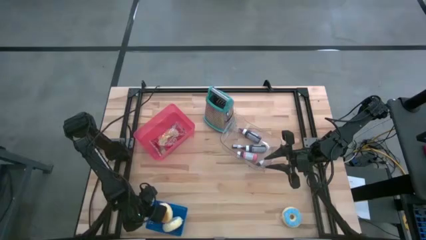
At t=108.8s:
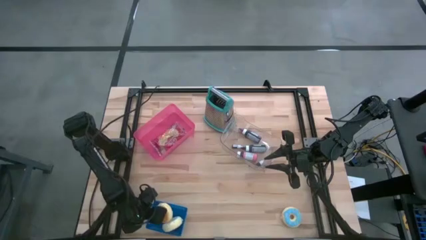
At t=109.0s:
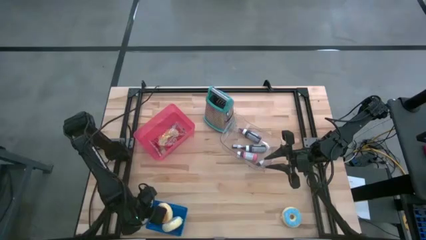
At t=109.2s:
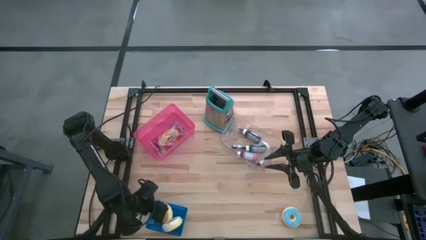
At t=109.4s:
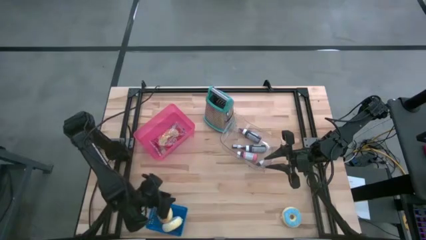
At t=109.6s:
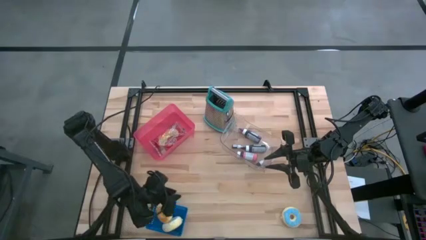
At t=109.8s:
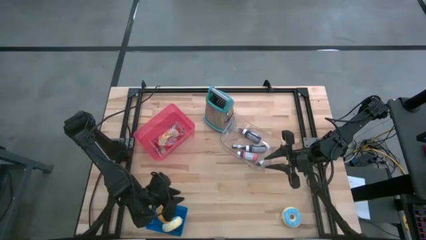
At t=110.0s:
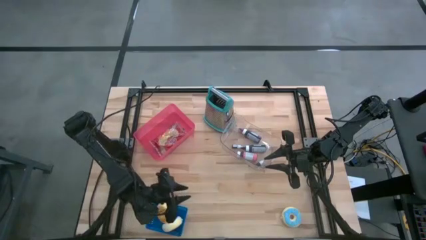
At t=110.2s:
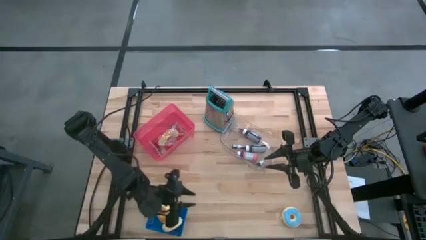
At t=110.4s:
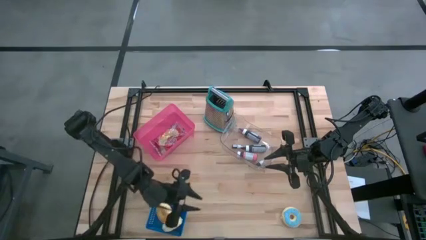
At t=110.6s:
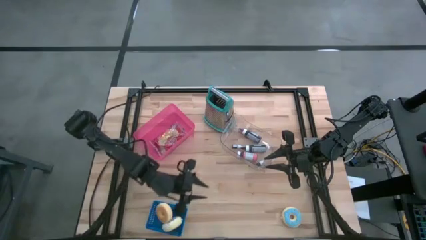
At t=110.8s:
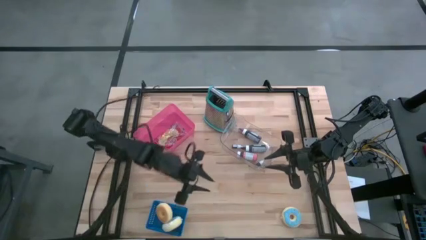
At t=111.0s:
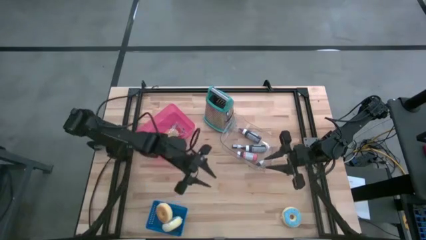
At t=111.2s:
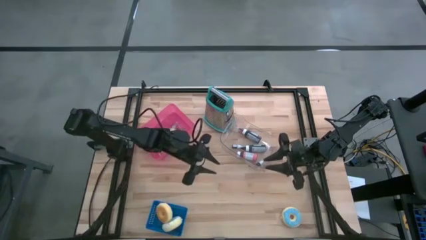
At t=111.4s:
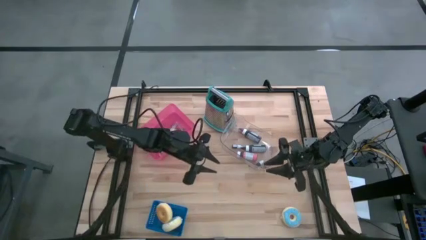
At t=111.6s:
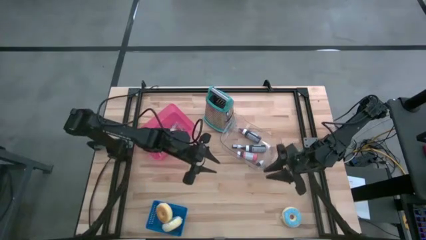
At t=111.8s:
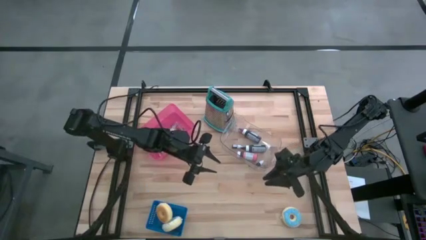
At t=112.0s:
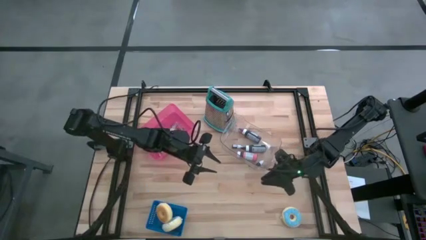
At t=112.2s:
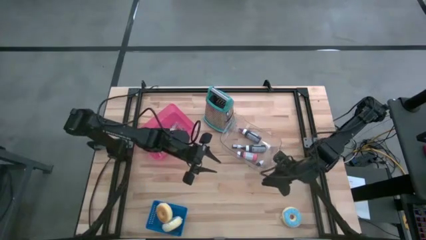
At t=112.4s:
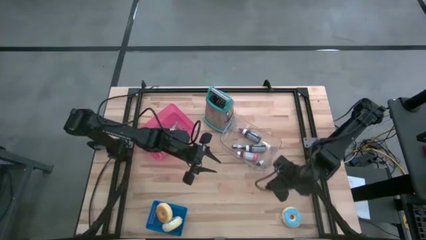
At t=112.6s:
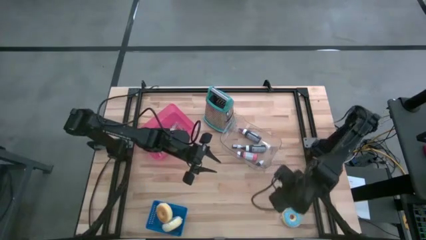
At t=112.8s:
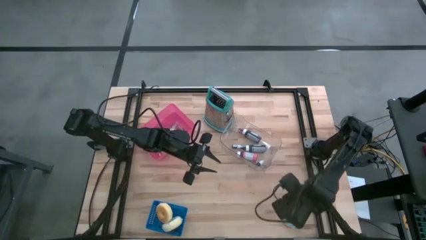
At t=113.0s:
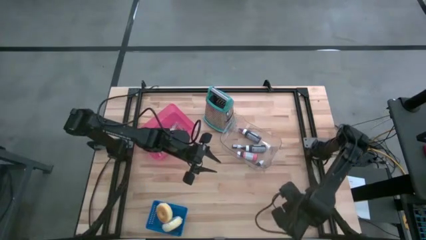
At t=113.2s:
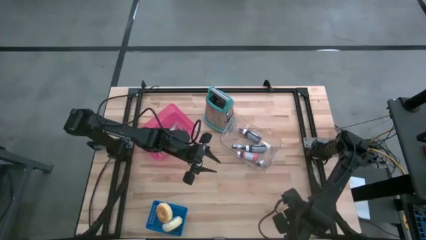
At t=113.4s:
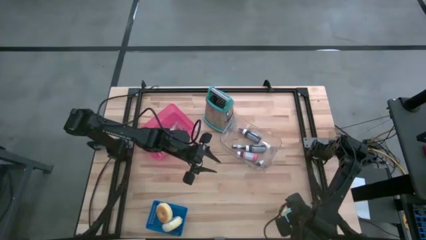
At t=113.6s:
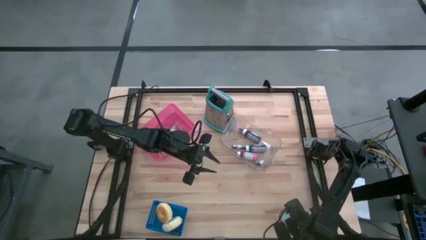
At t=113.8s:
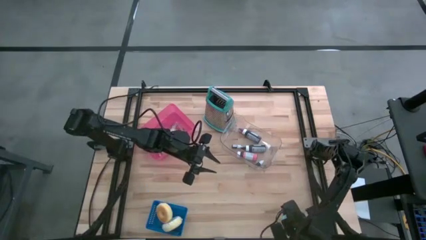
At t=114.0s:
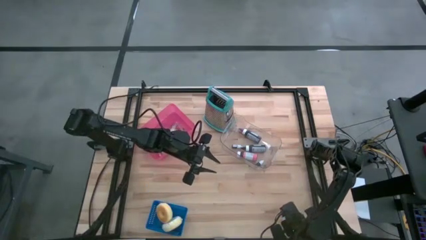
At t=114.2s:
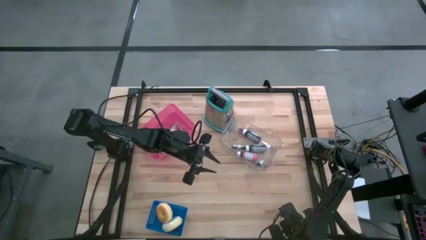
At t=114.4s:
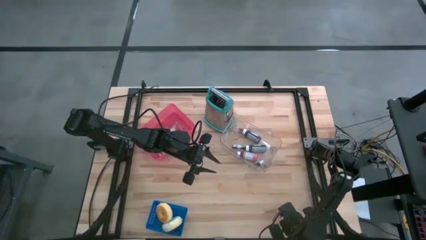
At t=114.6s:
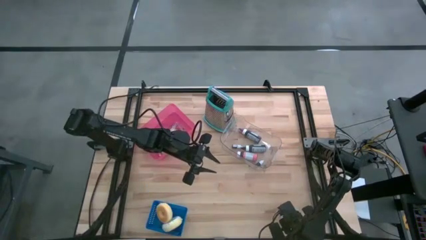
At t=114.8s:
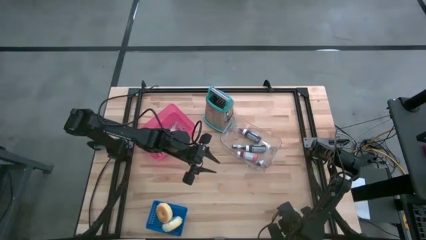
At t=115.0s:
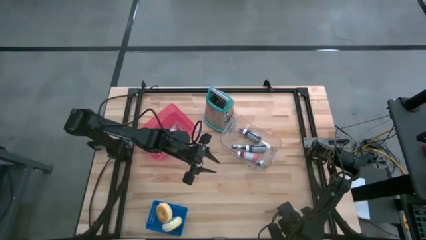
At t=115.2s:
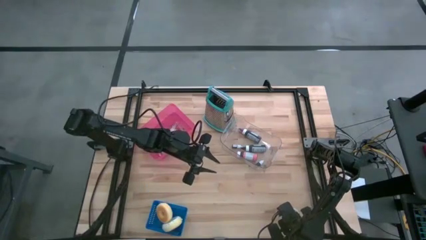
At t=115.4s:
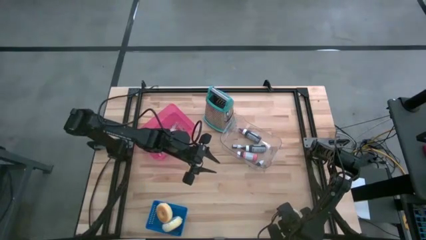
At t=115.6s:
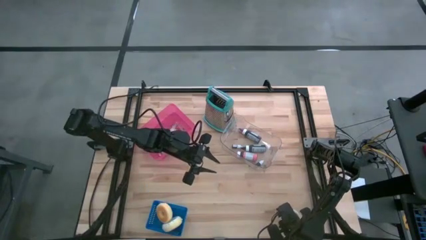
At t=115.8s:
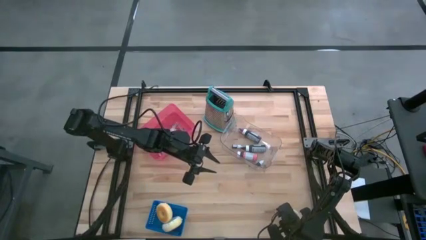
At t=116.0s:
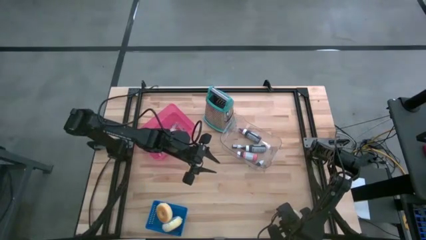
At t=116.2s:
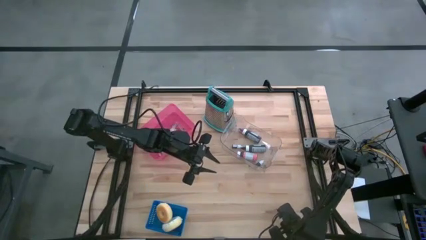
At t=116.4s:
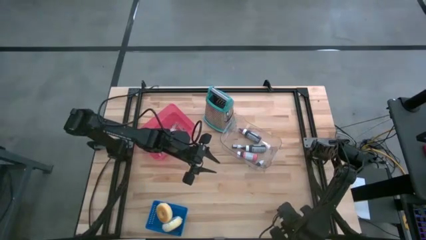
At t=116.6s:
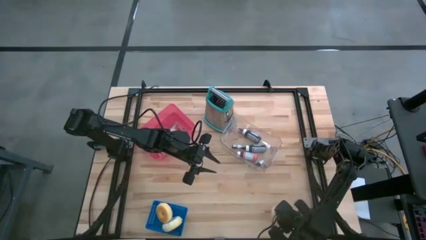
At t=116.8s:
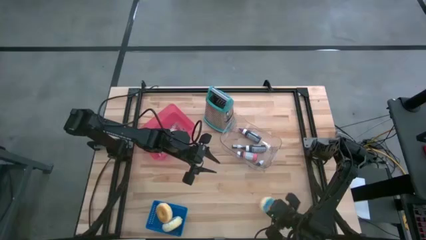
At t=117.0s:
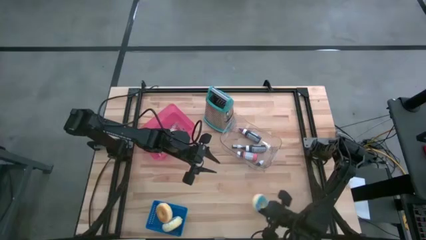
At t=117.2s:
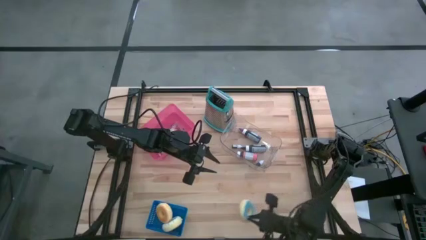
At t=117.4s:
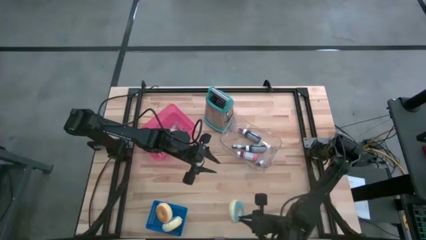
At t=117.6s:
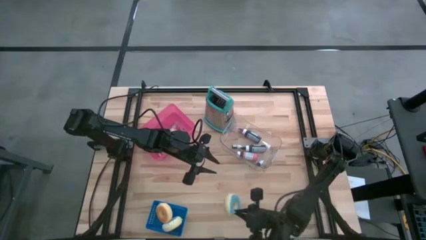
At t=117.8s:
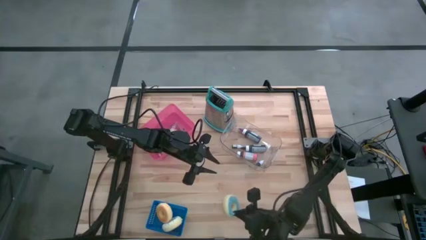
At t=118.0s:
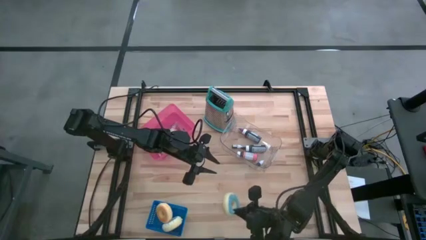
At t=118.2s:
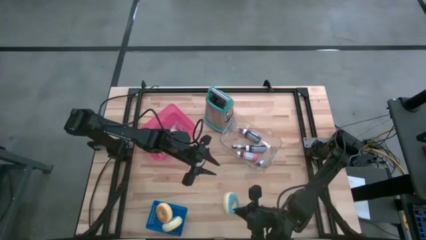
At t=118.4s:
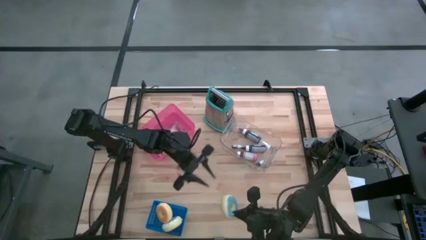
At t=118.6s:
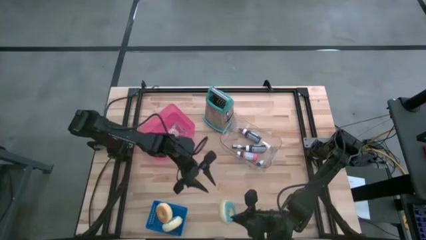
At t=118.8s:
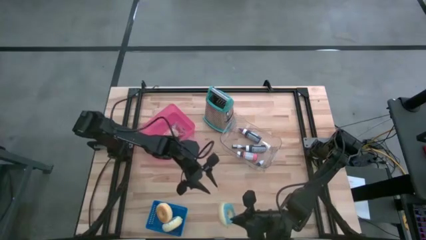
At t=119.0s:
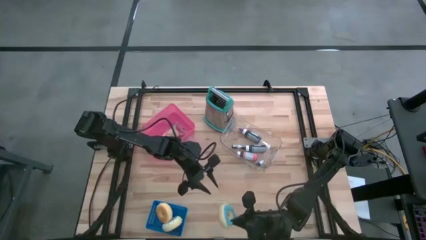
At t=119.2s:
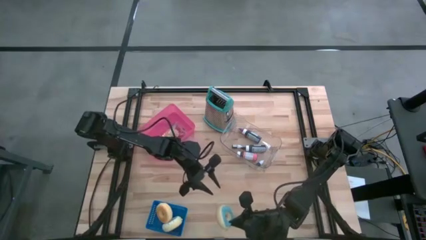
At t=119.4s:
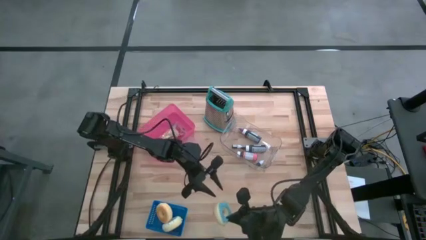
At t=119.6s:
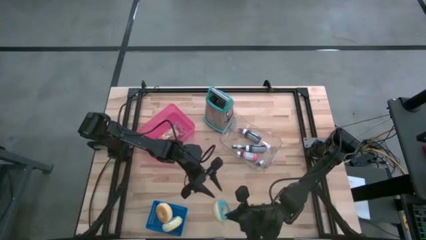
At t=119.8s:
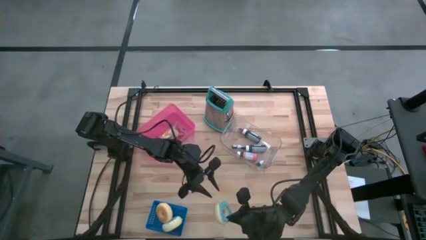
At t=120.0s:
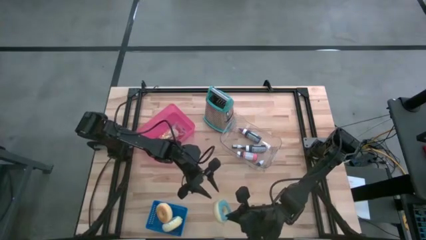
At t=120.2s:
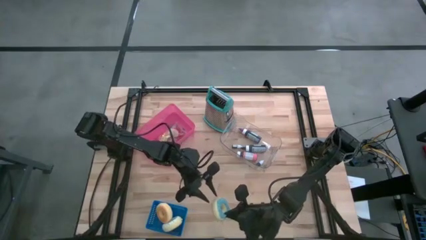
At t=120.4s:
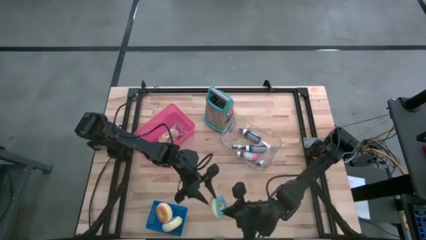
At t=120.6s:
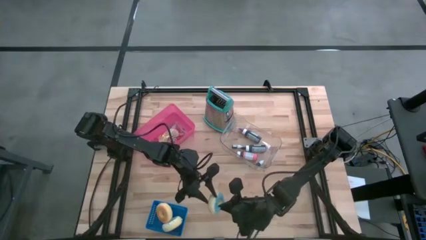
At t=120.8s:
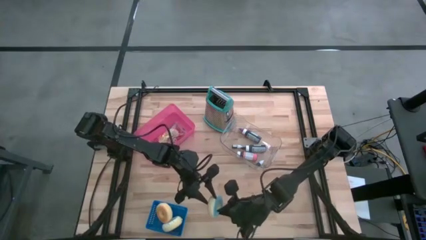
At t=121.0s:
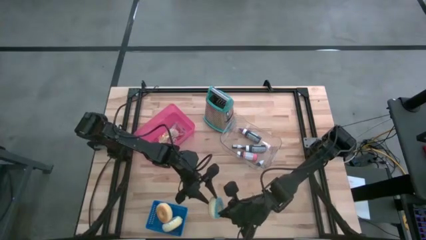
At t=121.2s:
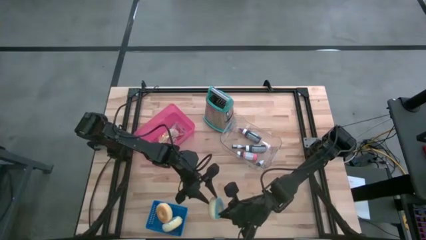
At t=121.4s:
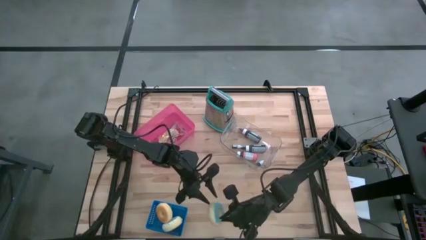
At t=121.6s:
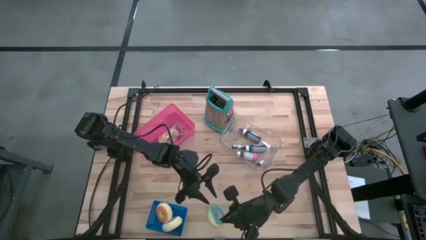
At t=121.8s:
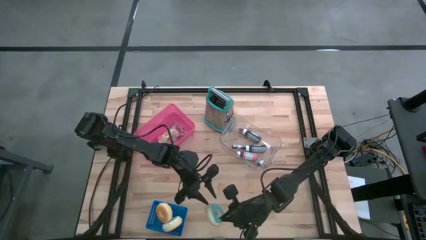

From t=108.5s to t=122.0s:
Task: Pick & Place Food Item
Put the blue donut into the blue bin

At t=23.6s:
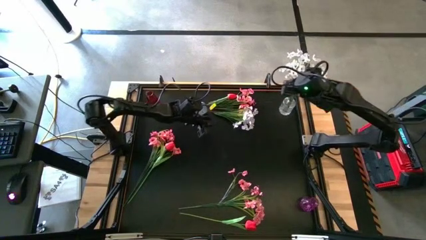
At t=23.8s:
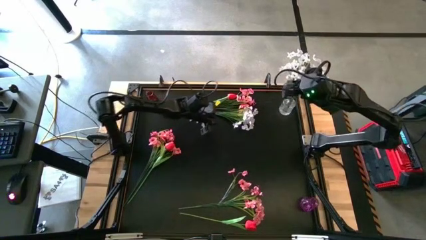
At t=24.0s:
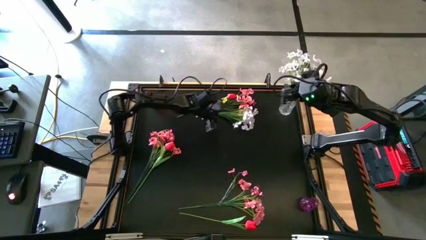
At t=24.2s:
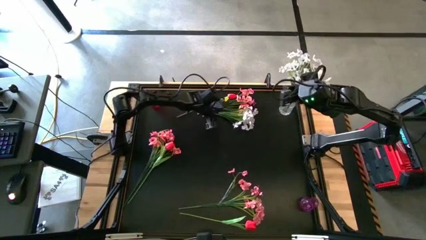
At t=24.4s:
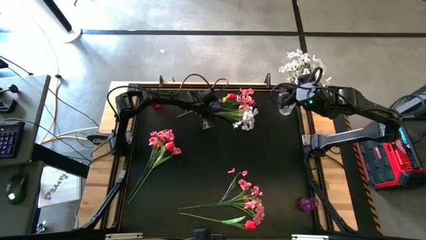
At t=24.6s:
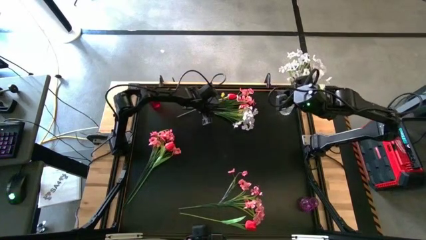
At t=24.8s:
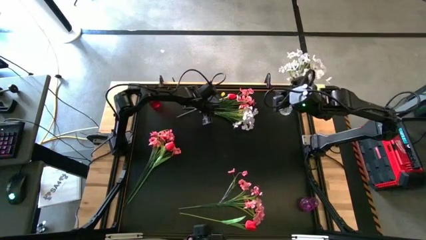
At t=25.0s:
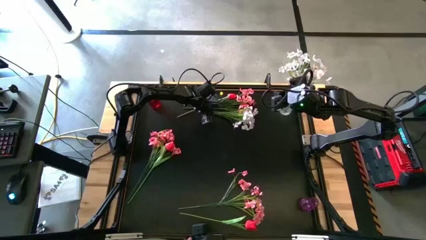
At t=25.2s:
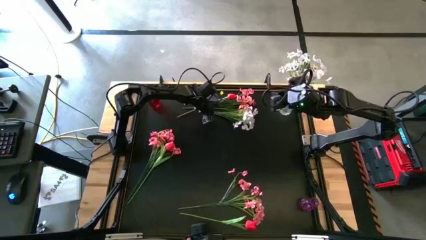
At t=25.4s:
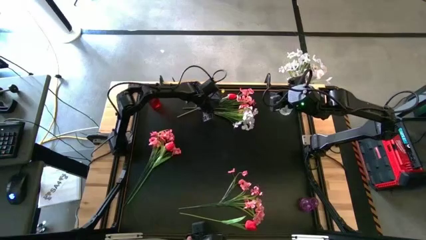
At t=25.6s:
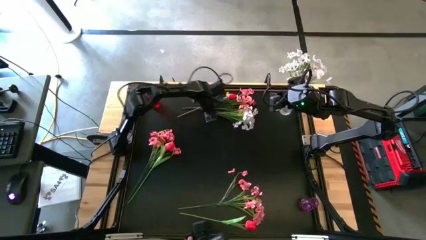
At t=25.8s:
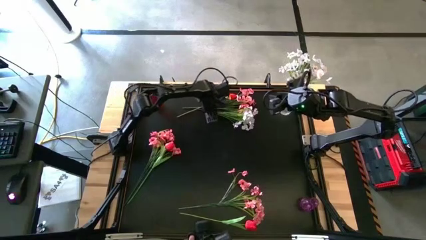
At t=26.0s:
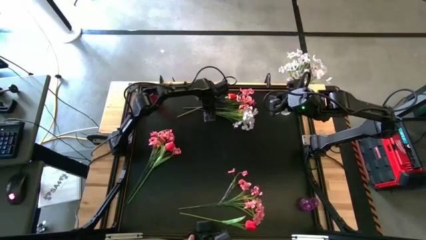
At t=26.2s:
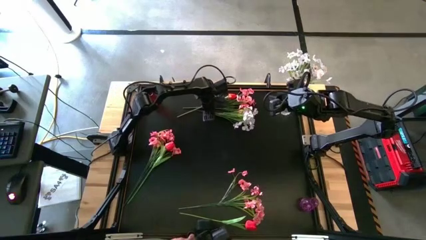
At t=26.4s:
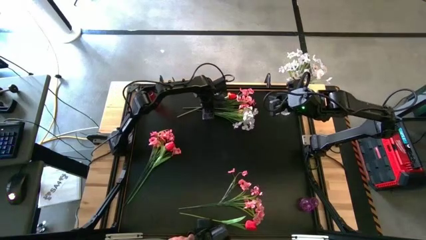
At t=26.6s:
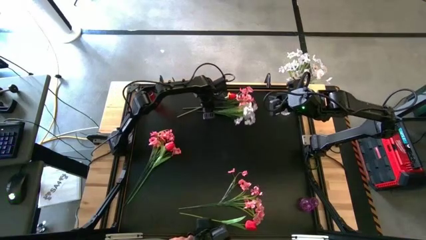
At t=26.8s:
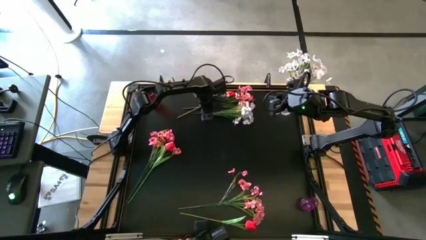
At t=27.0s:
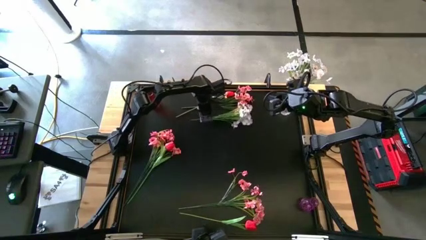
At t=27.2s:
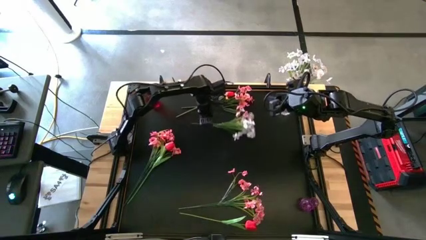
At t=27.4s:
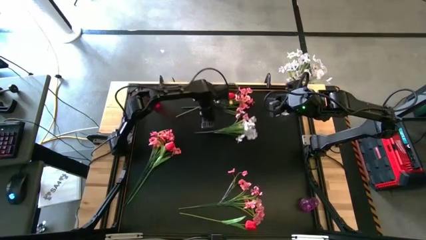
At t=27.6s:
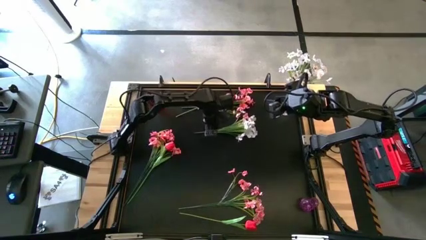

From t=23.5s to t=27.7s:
Task: Sort flowers into vase by color
Put the white flowers into the transparent flower vase
